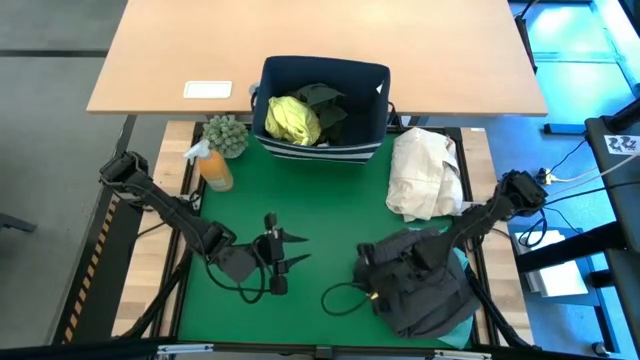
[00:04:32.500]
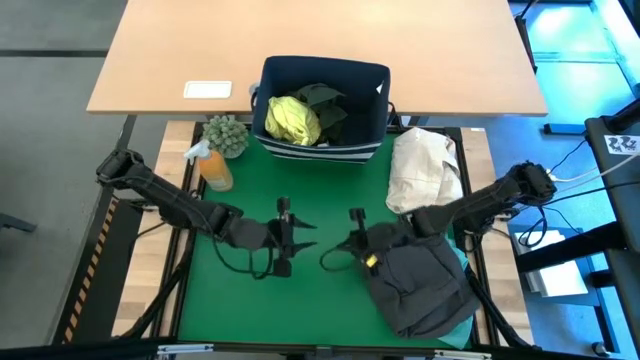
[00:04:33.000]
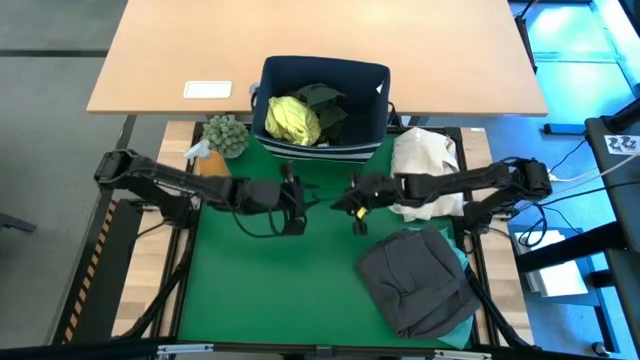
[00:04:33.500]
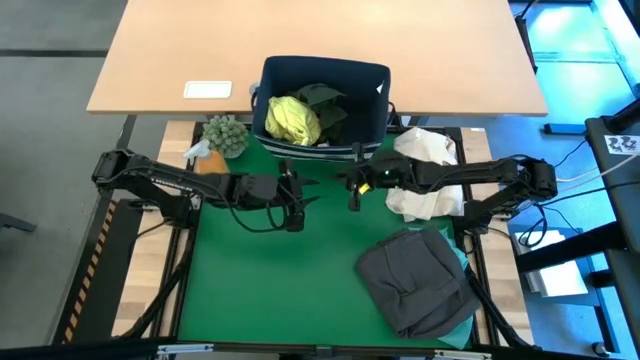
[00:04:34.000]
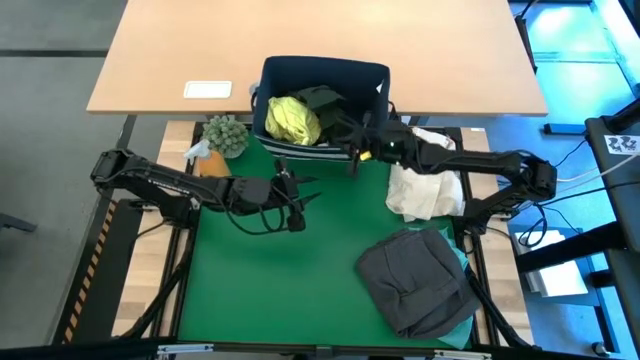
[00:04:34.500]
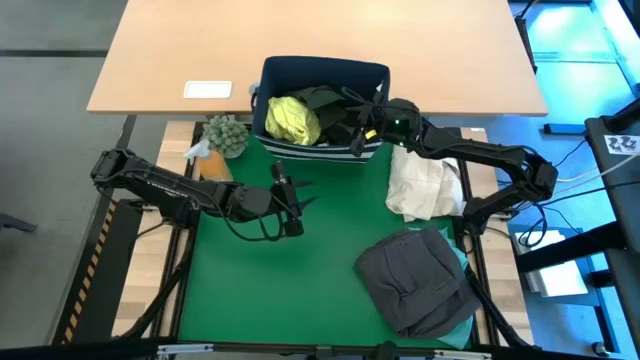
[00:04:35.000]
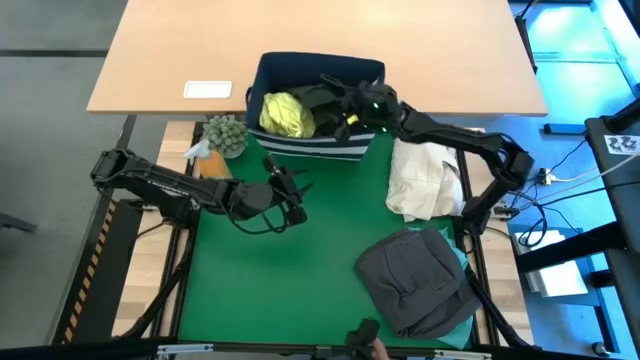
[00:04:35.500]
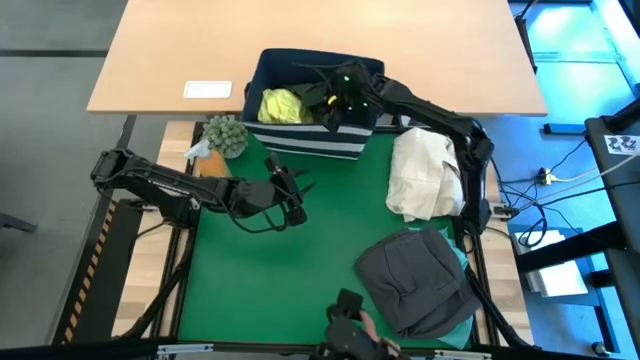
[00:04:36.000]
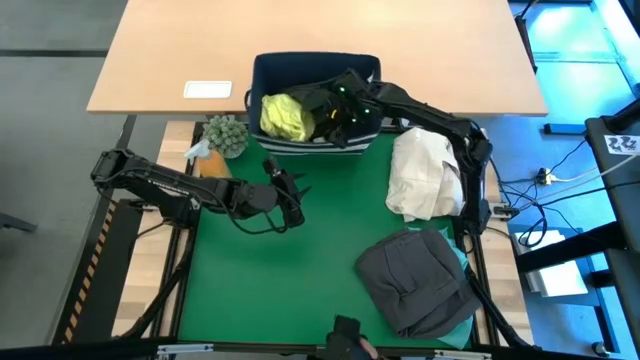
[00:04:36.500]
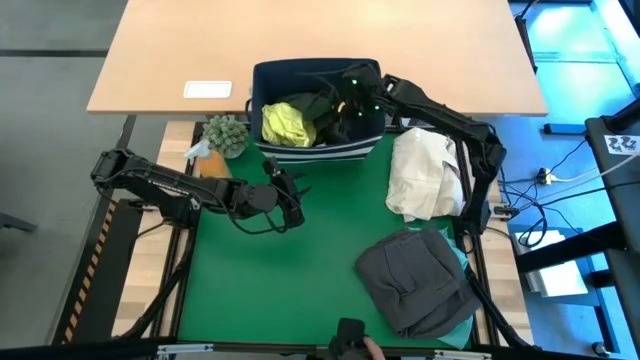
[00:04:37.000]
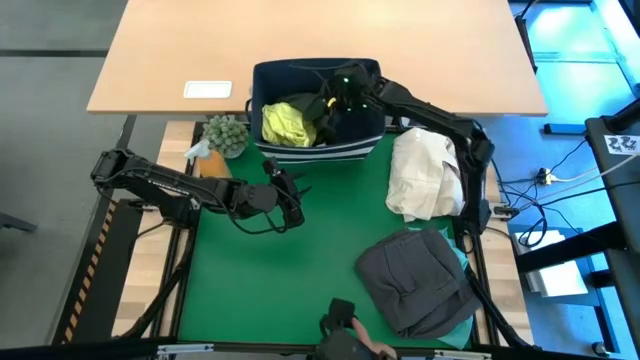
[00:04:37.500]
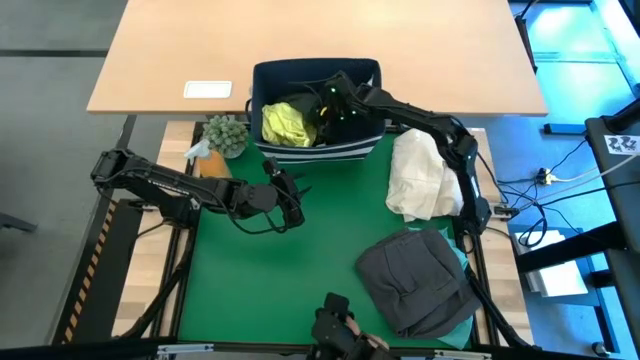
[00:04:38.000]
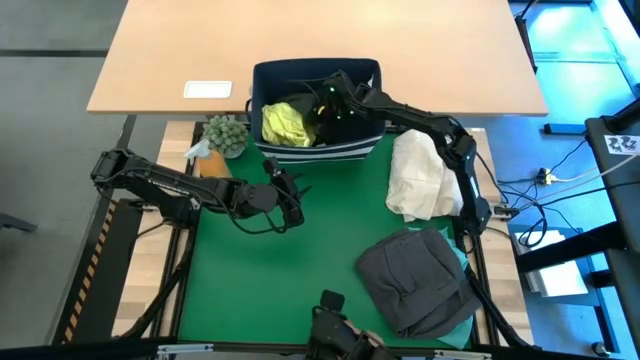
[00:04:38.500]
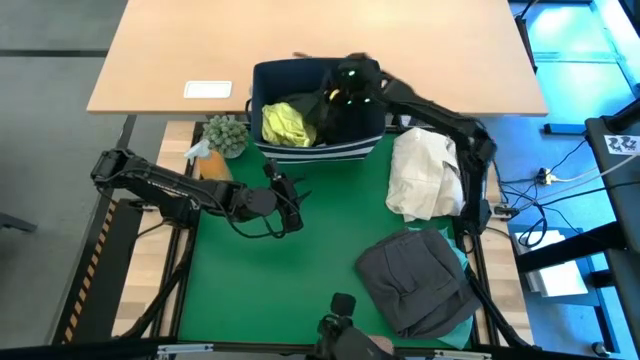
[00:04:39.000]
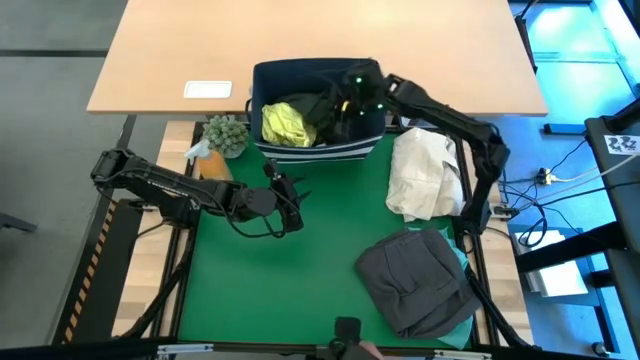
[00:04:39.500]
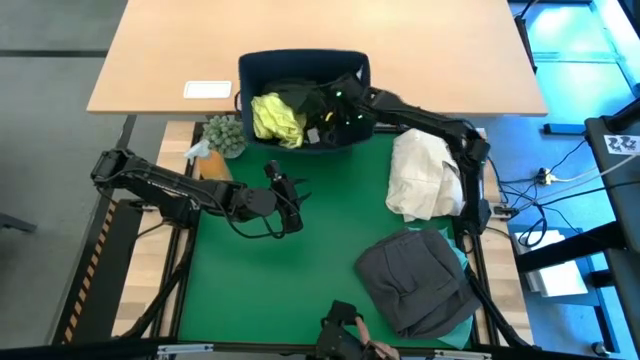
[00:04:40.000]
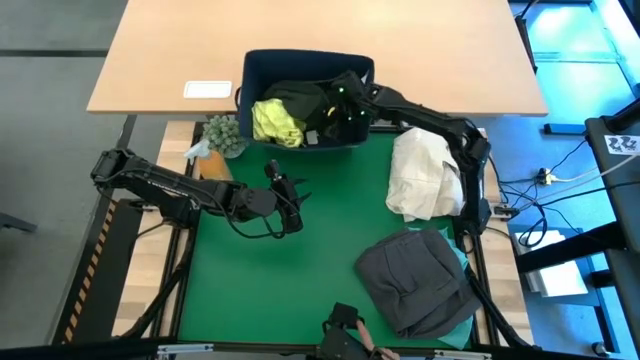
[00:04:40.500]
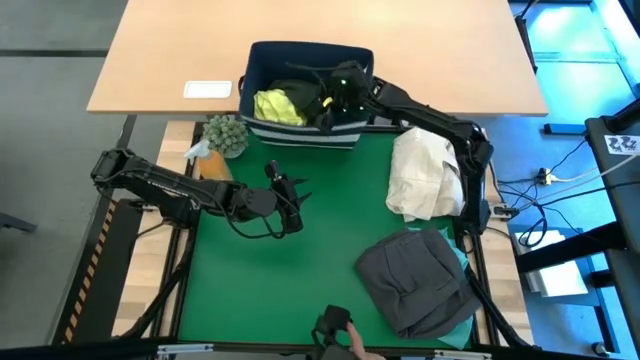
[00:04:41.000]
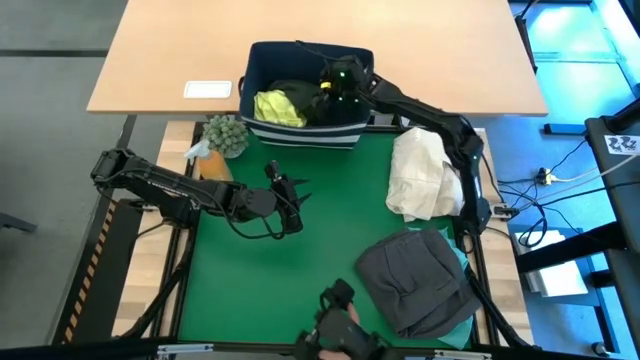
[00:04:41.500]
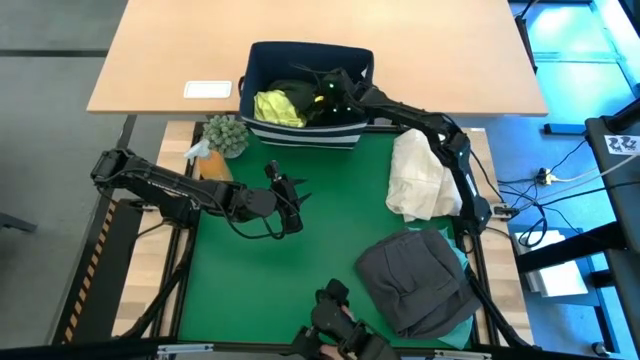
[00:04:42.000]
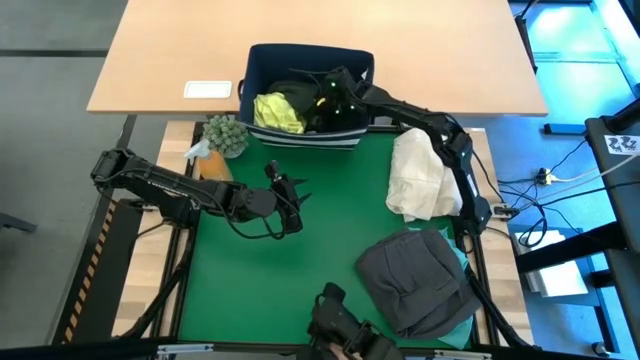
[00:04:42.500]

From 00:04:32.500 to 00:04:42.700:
Task: Fold laundry
Fold the green polo shirt
